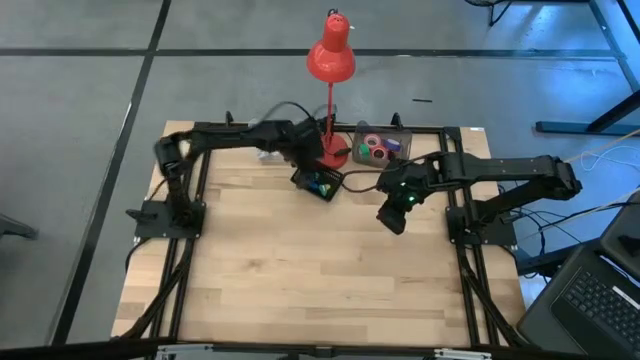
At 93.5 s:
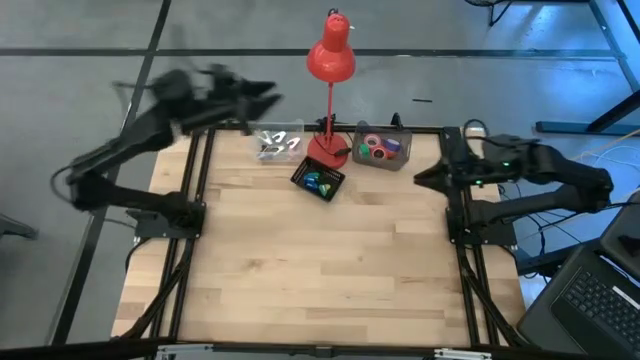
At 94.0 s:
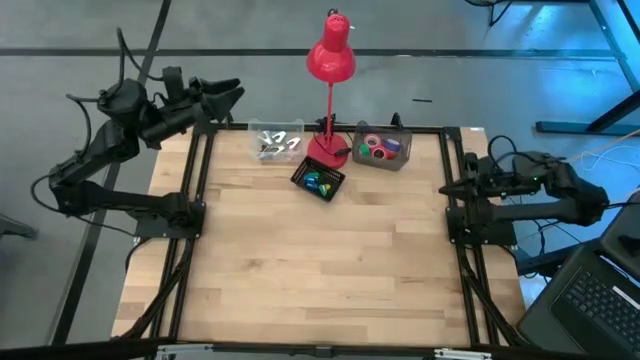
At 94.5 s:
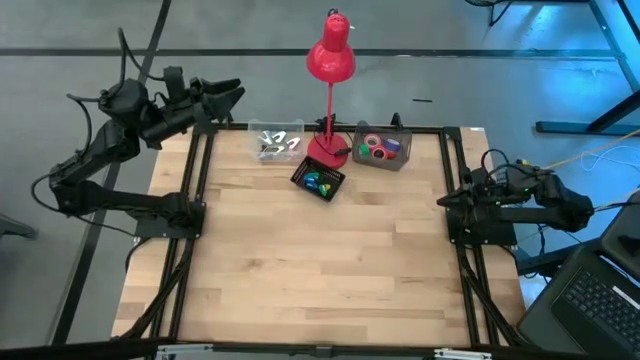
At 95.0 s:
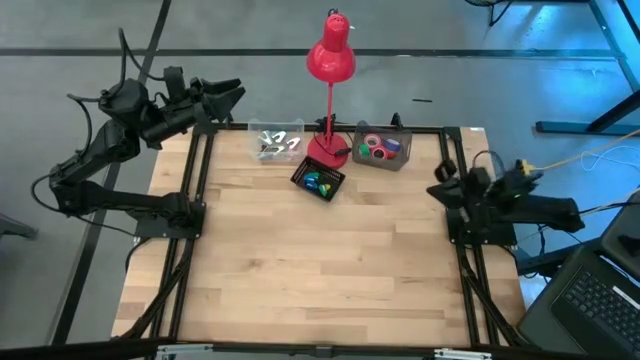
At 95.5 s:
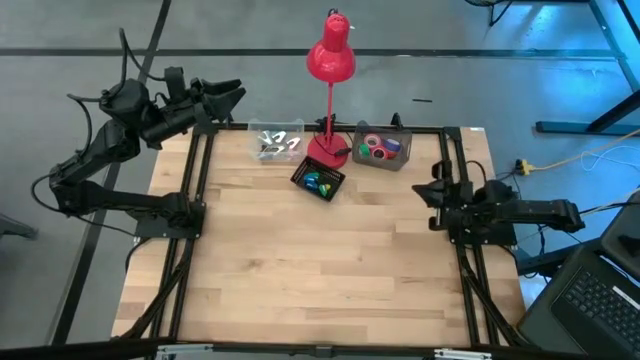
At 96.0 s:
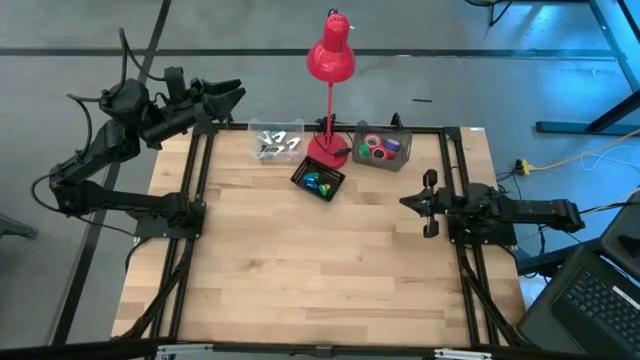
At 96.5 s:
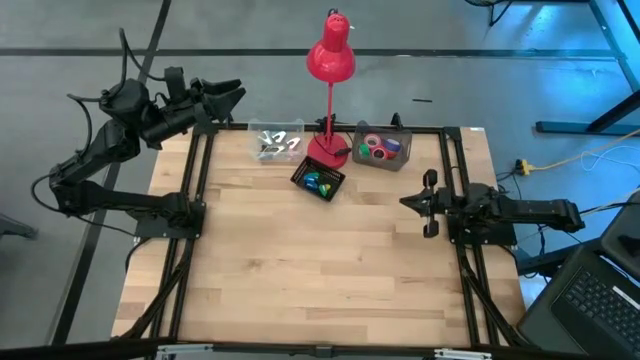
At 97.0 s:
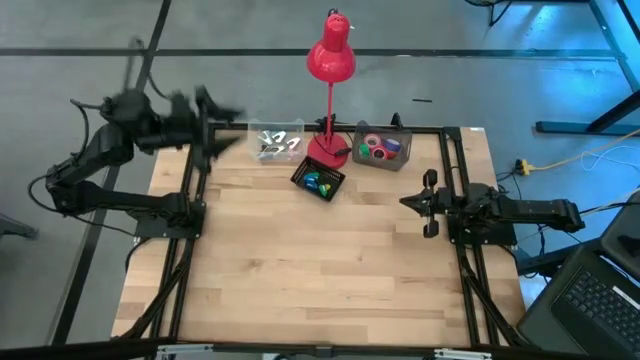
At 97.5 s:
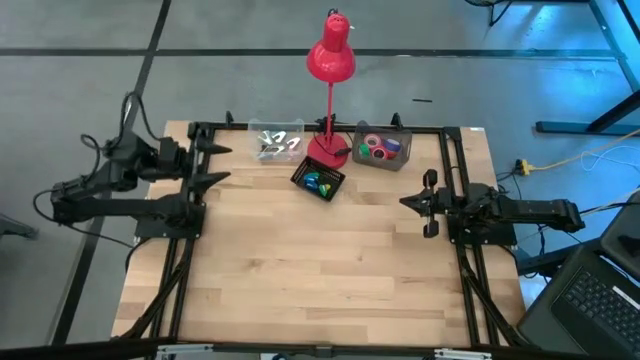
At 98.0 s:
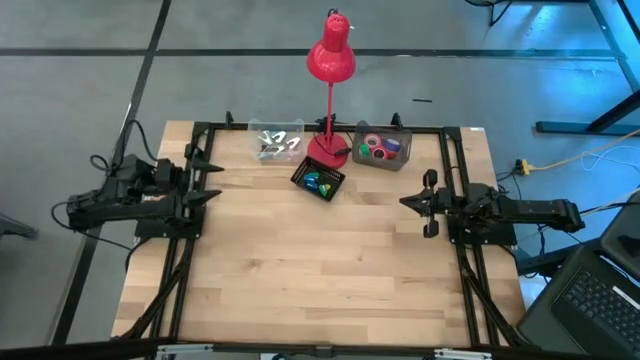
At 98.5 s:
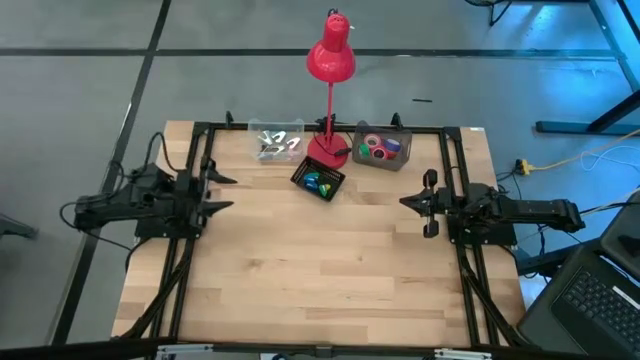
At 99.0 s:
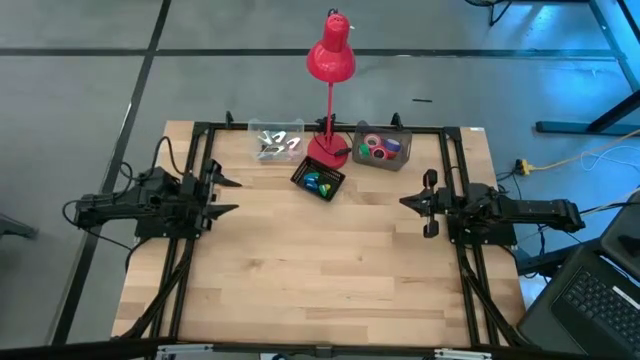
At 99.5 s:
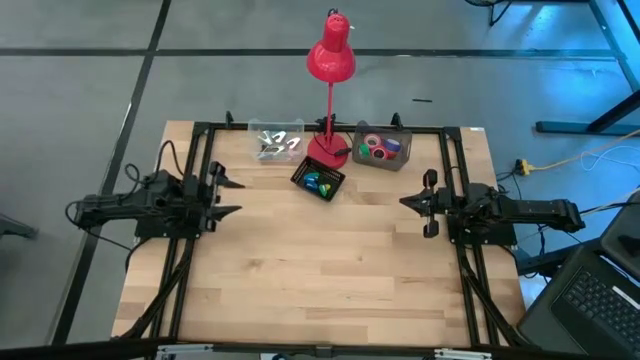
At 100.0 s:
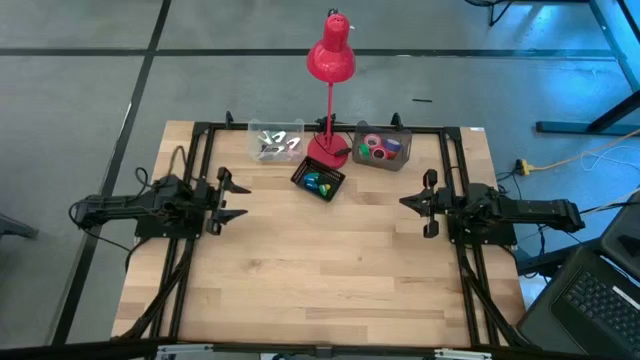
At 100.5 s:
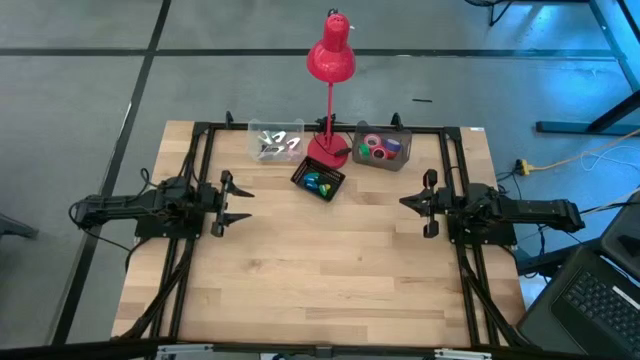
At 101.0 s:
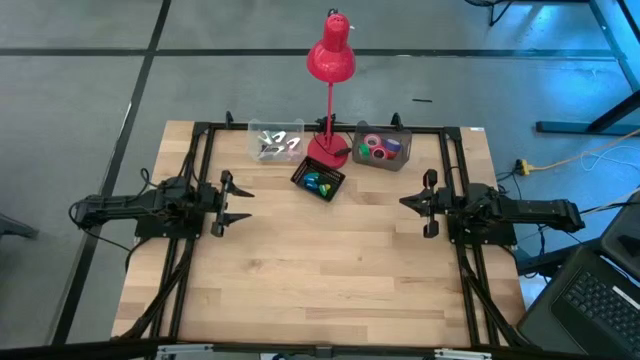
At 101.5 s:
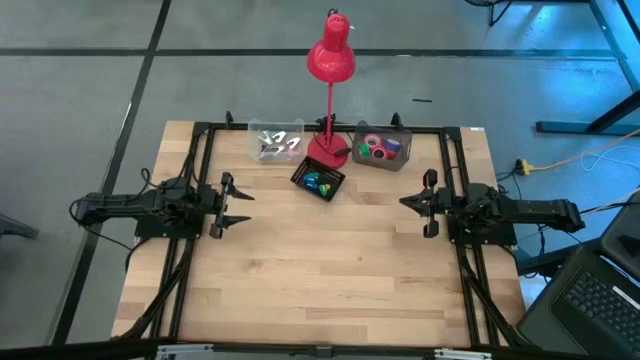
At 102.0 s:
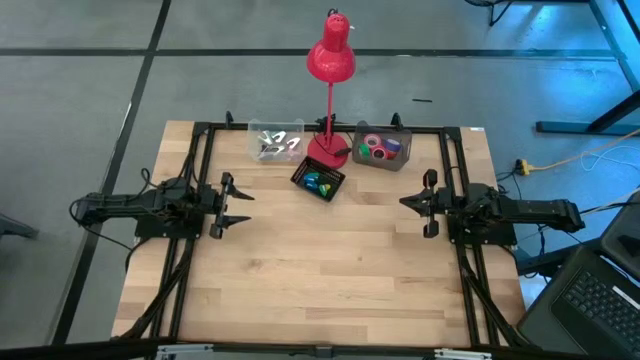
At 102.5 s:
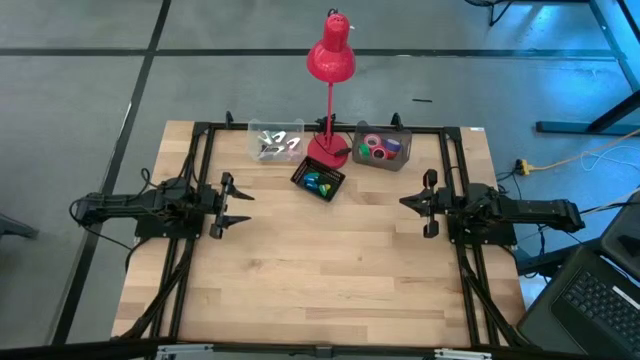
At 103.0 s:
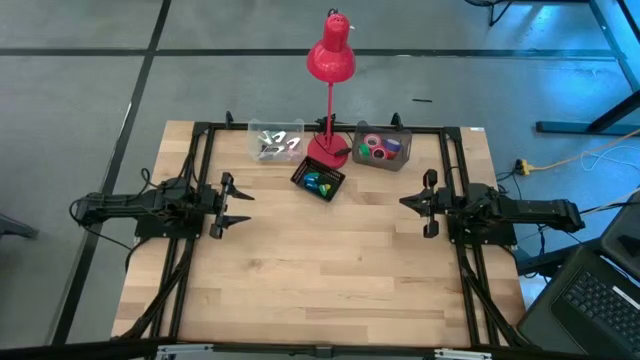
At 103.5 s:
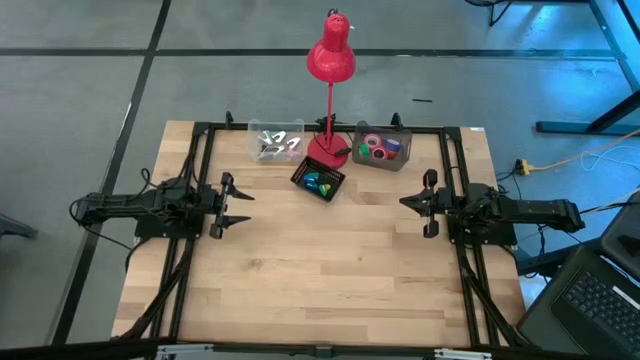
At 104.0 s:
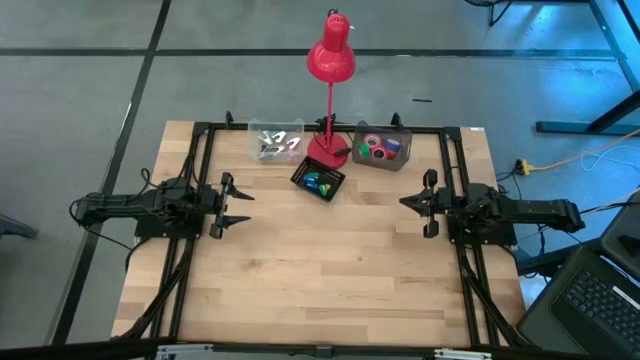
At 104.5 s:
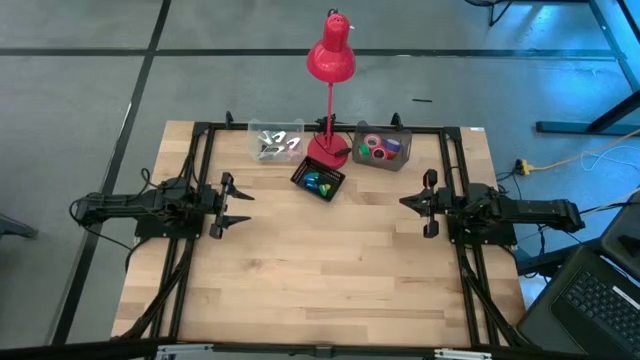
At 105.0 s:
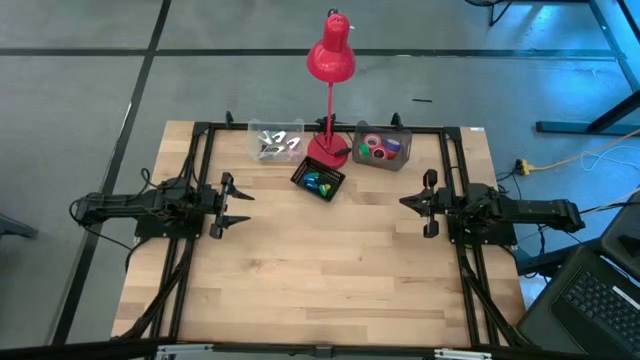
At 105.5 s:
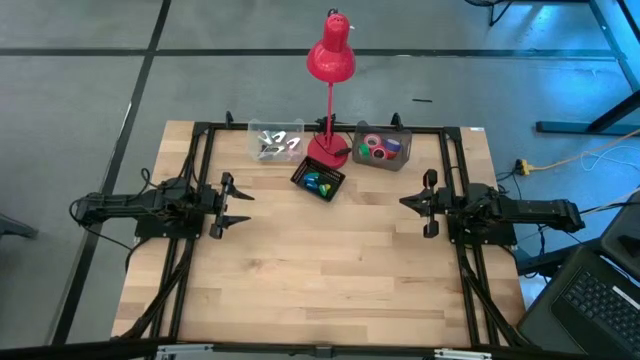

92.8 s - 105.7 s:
Task: Pick and place Stapler, Stapler remover, tape
Return to Home Position

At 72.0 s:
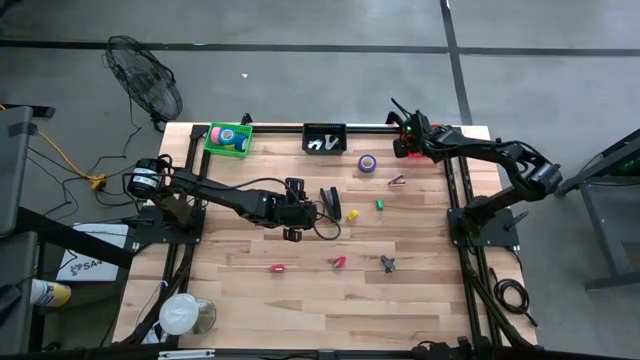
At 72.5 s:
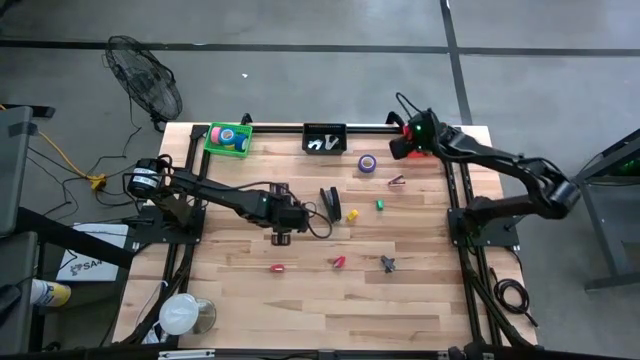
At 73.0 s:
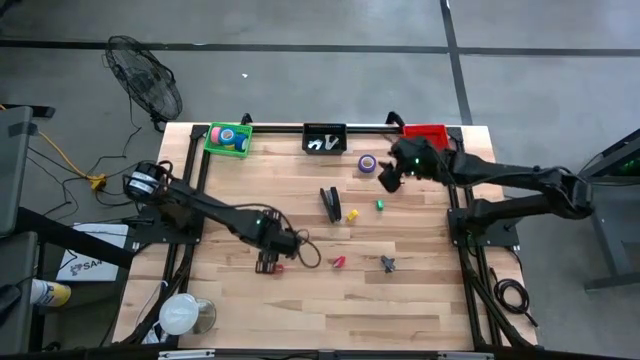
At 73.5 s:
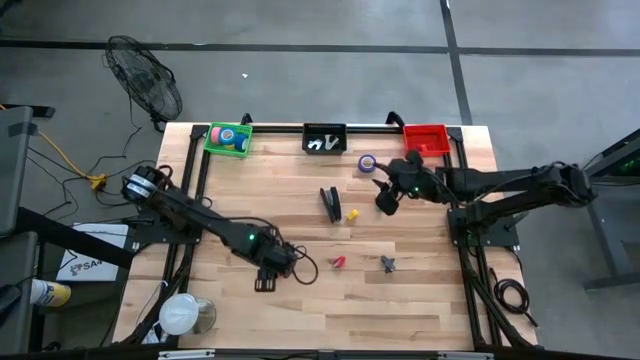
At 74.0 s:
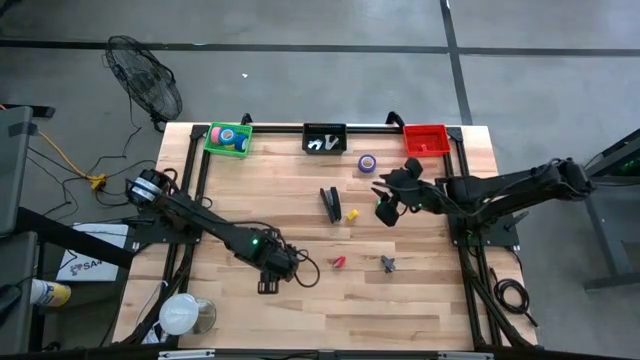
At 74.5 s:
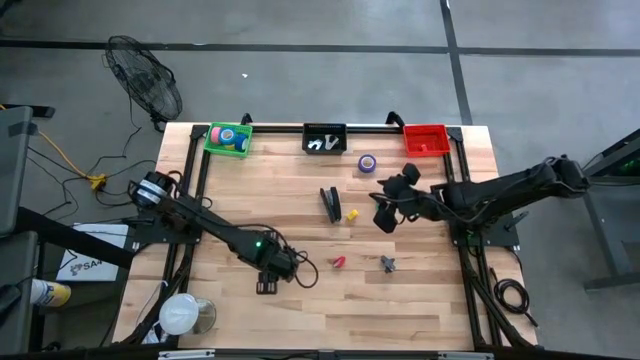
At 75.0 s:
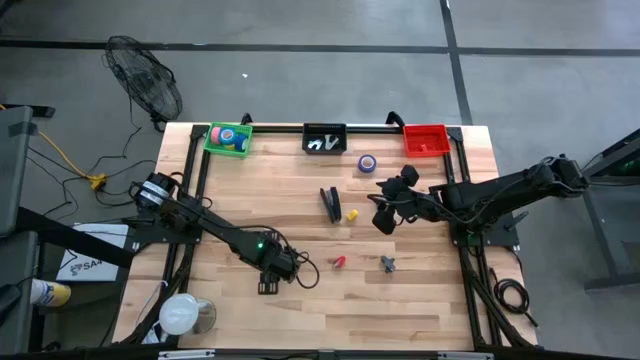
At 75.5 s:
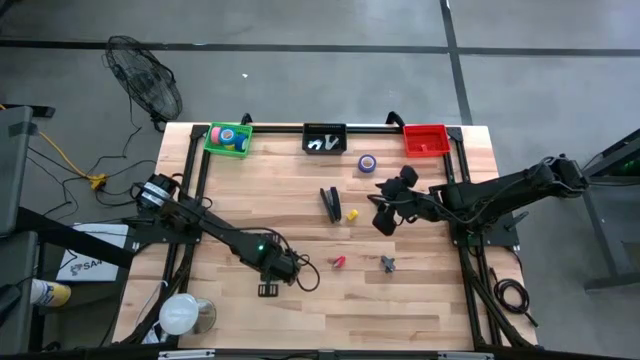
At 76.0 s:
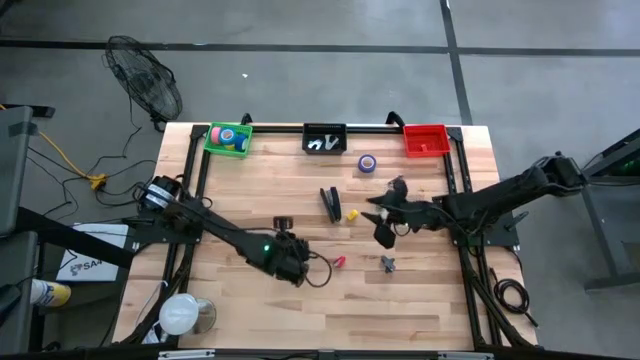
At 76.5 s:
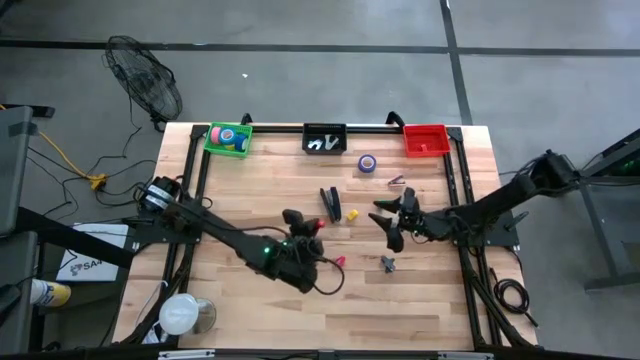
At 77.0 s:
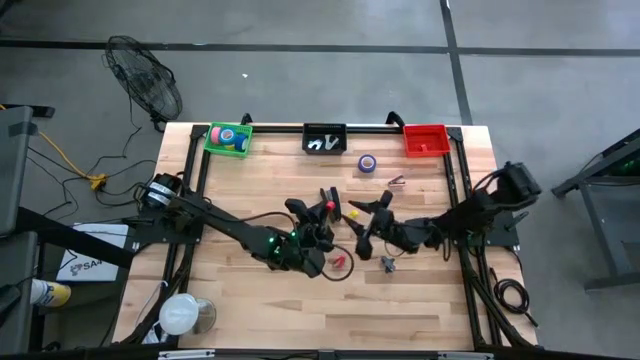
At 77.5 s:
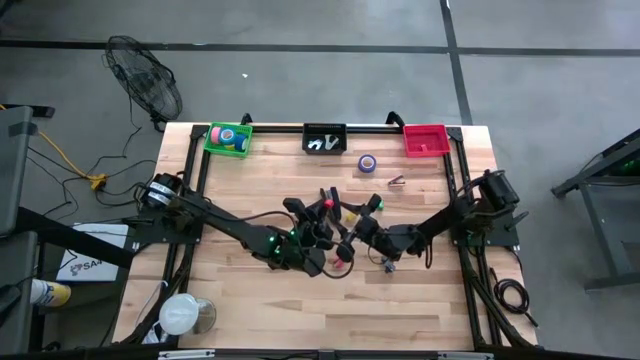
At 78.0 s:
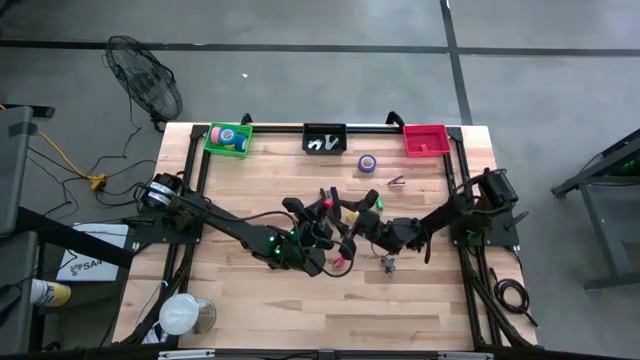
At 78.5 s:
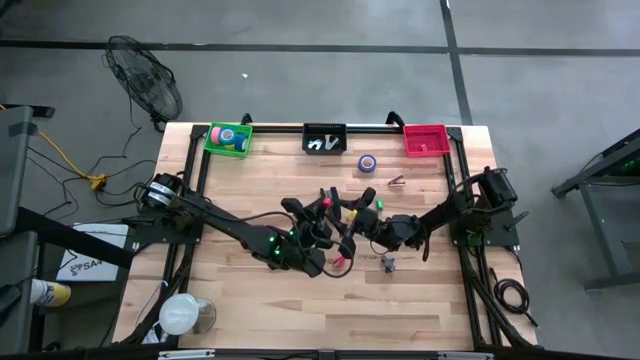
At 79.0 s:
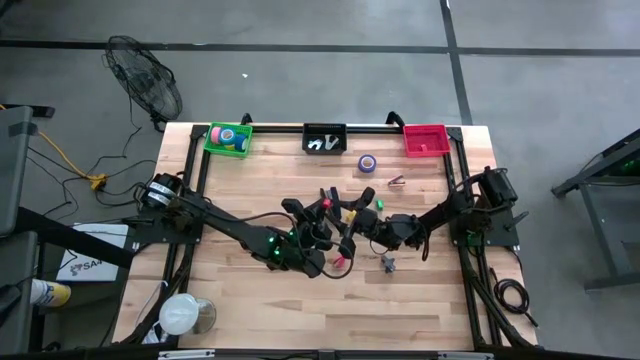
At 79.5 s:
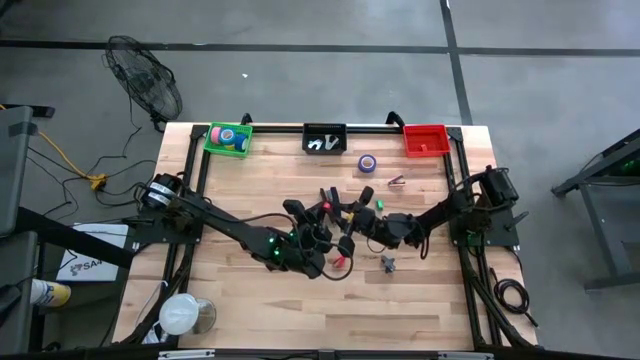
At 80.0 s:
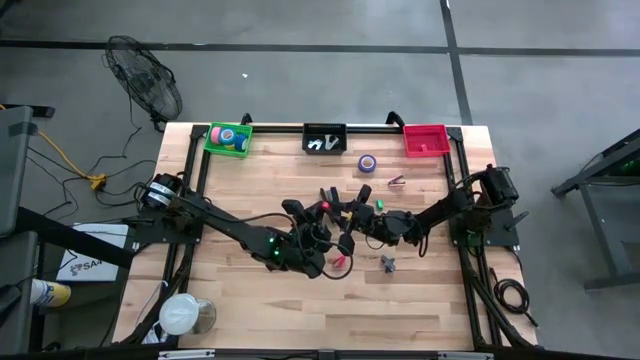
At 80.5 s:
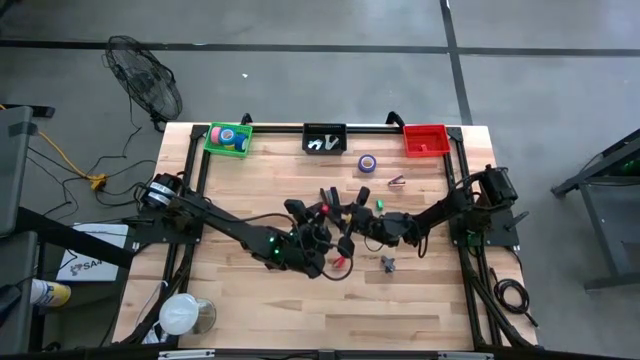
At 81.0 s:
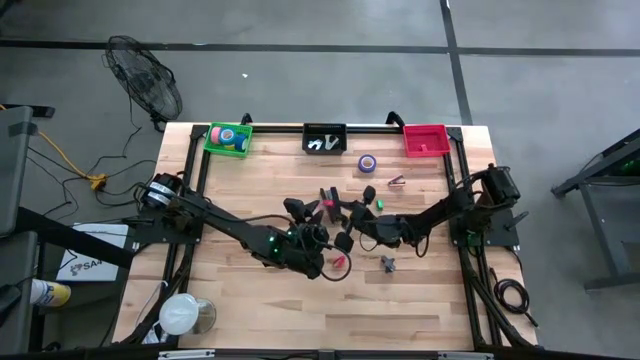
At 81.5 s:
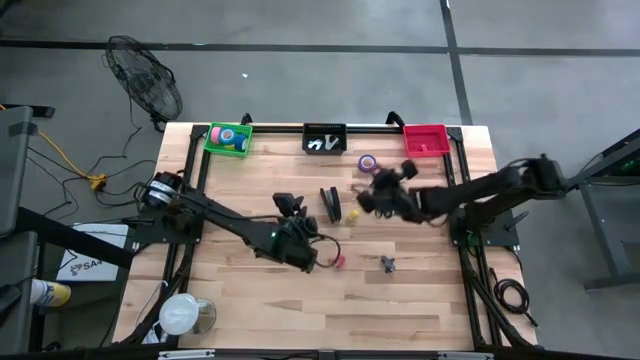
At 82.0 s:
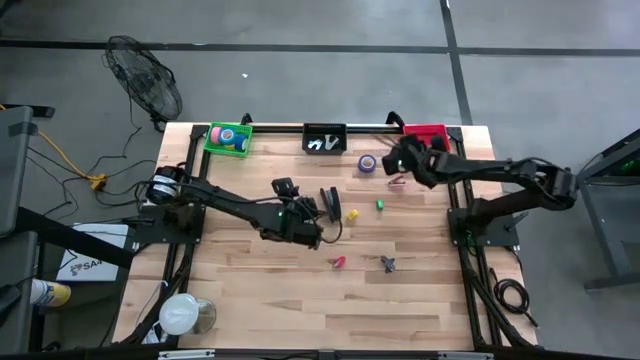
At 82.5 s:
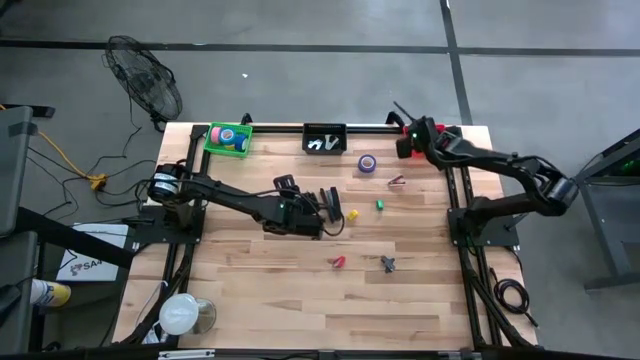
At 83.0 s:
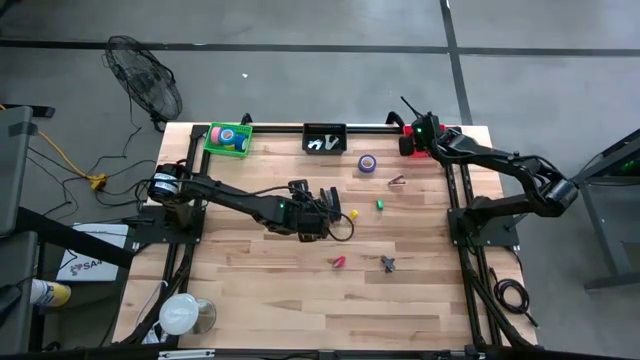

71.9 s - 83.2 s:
Task: Pick and place Stapler, Stapler remover, tape
Put the left red stapler in the red bin
